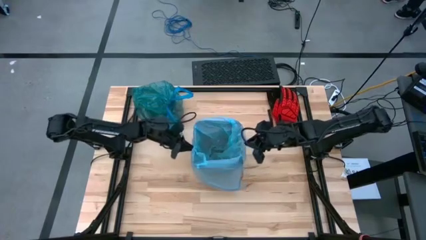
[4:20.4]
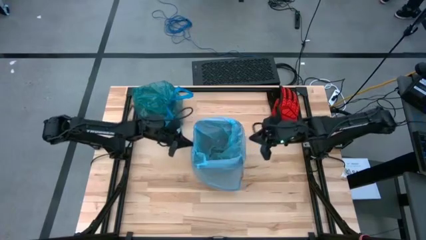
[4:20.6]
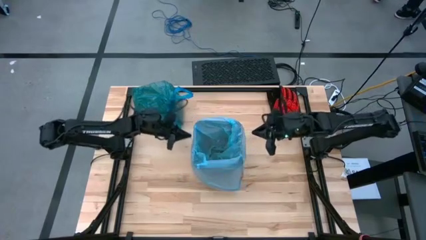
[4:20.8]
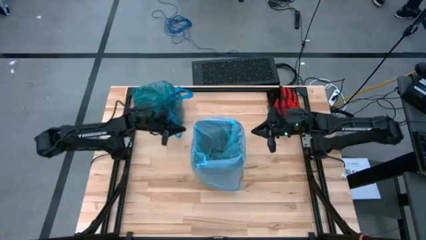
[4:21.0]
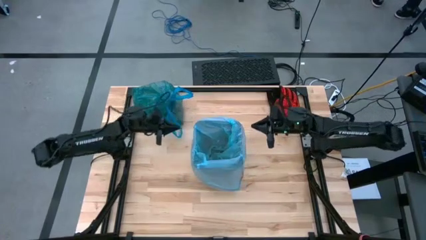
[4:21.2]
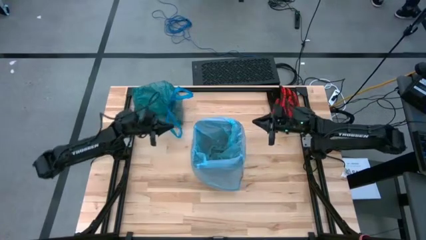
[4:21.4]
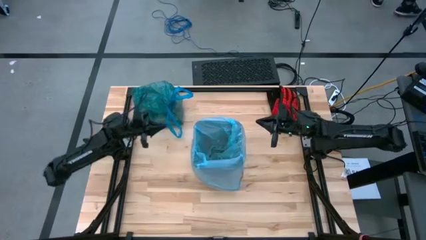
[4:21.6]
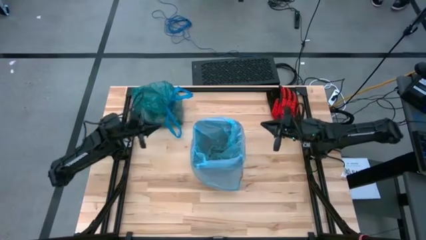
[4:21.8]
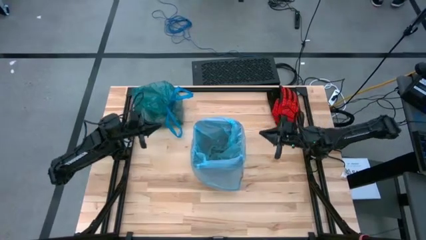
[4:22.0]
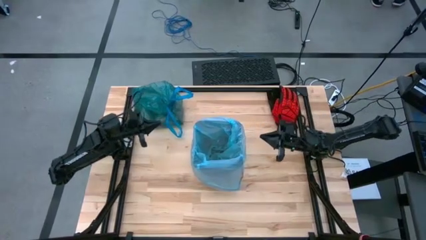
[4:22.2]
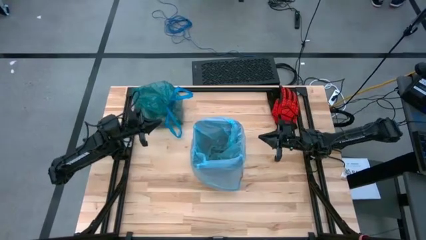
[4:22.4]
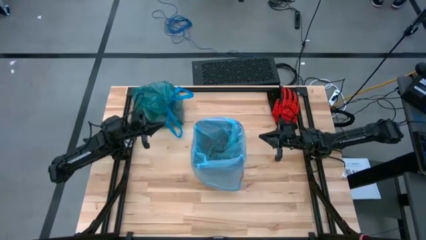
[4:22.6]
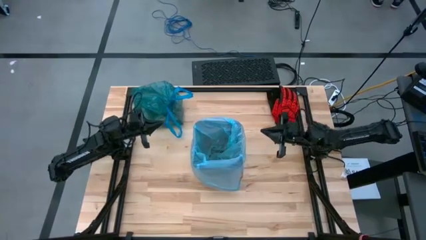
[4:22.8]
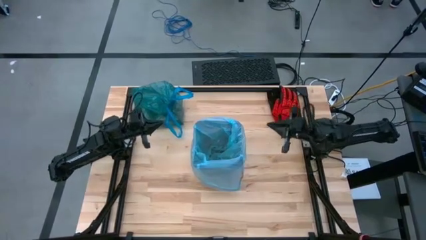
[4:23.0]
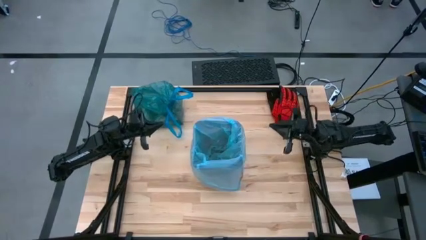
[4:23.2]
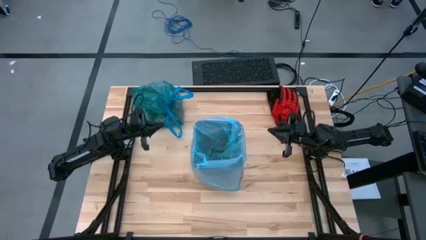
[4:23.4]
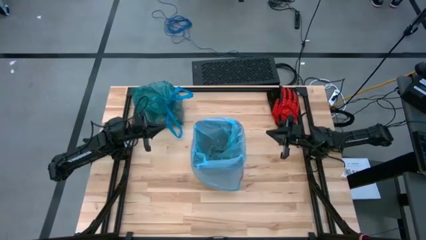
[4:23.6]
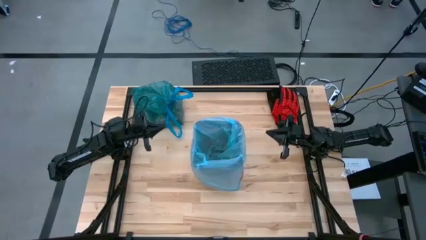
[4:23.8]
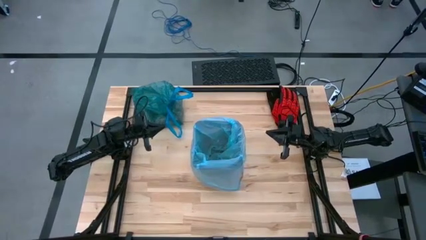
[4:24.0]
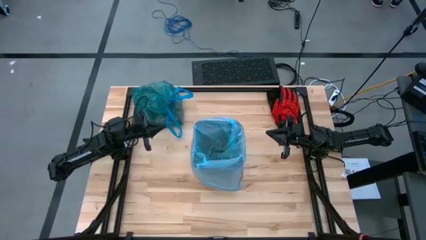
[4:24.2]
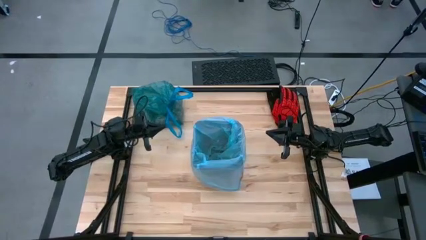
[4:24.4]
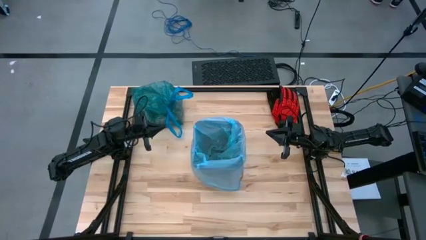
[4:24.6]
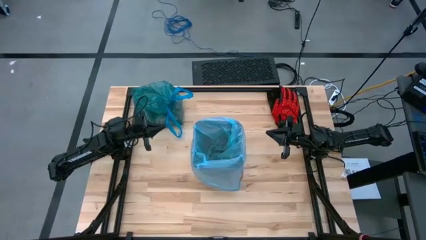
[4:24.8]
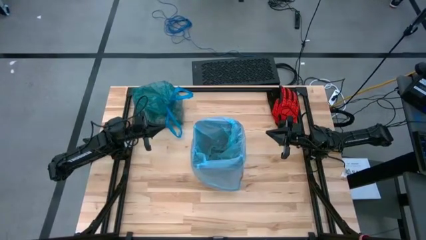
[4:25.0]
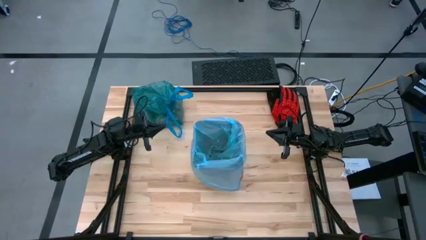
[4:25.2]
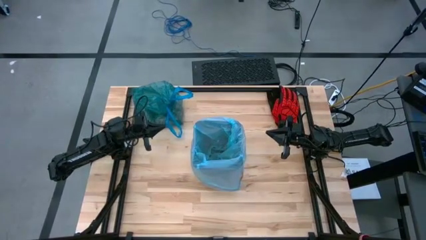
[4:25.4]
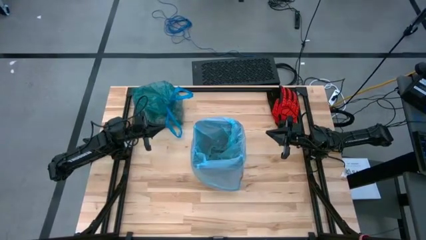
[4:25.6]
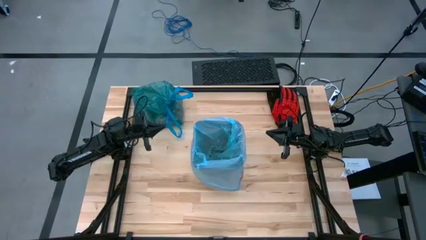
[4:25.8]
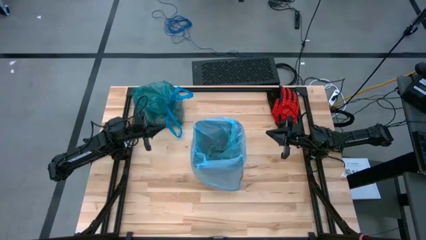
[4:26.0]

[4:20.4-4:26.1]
Task: place trash/remove bag and relplace
Return to Home Position

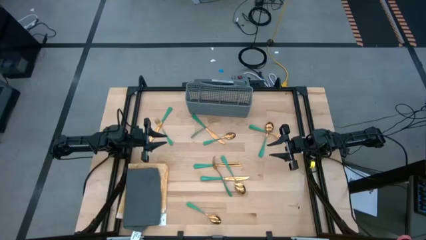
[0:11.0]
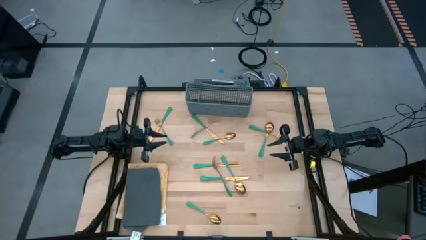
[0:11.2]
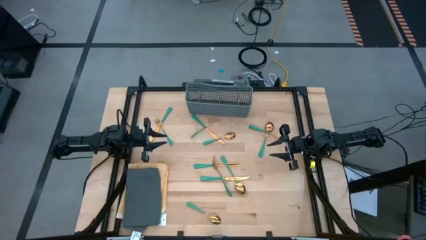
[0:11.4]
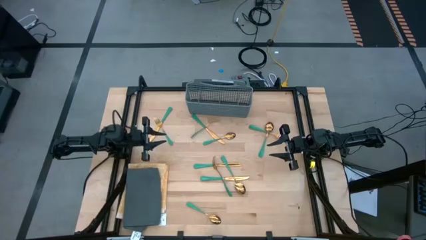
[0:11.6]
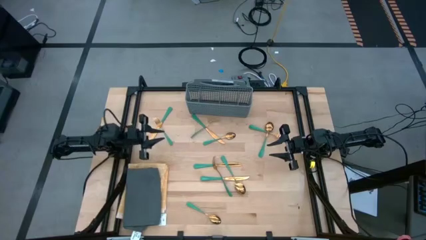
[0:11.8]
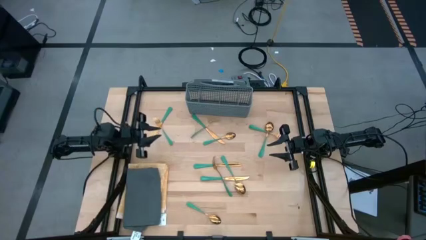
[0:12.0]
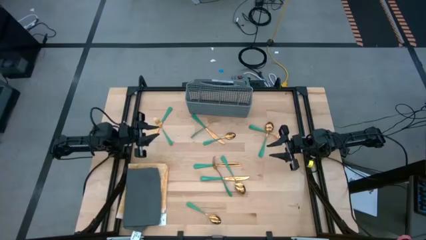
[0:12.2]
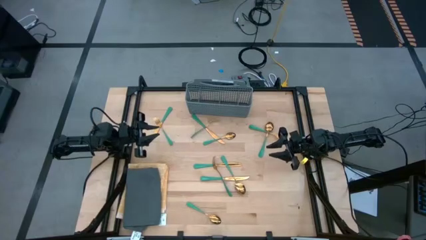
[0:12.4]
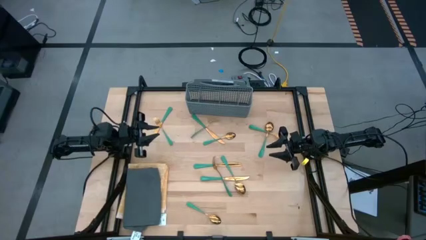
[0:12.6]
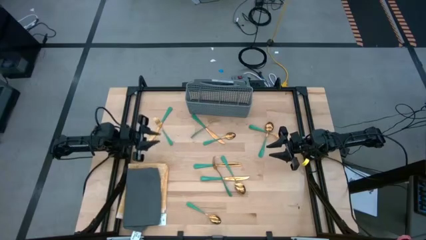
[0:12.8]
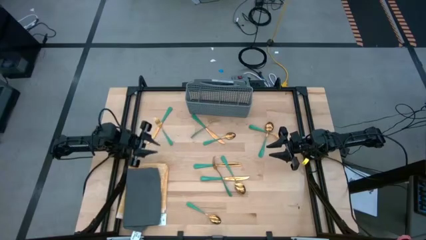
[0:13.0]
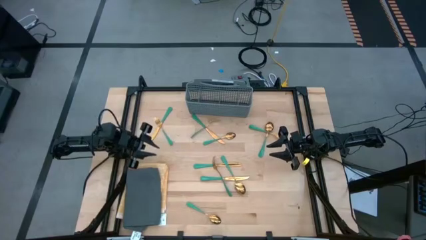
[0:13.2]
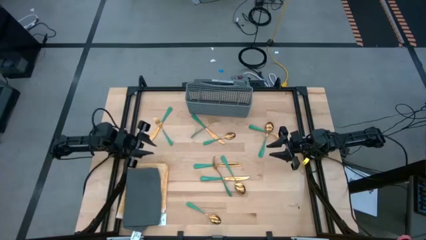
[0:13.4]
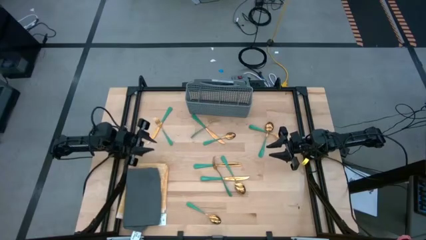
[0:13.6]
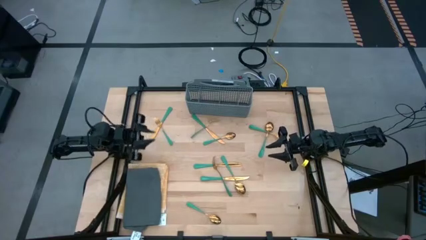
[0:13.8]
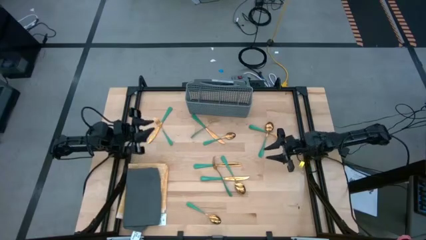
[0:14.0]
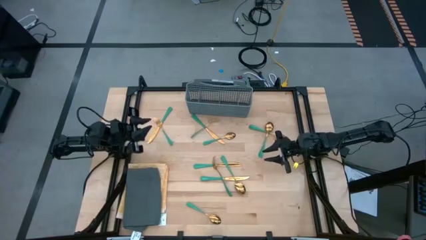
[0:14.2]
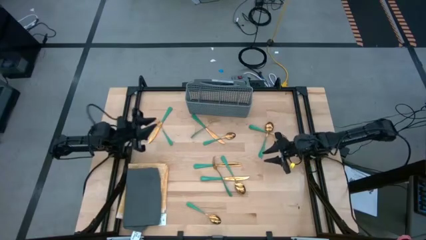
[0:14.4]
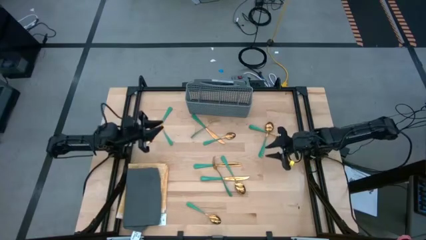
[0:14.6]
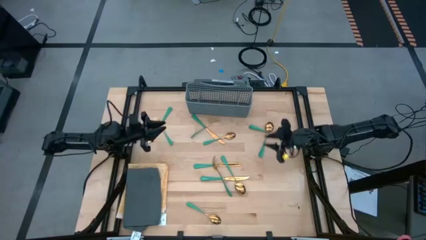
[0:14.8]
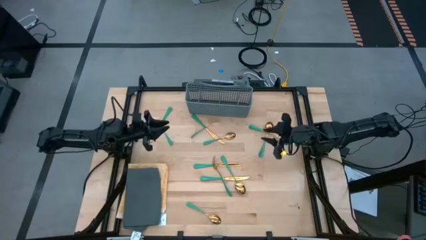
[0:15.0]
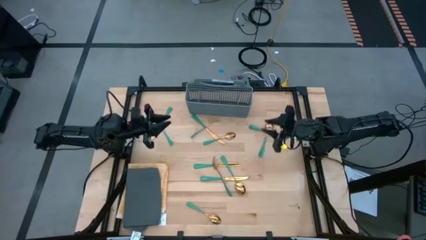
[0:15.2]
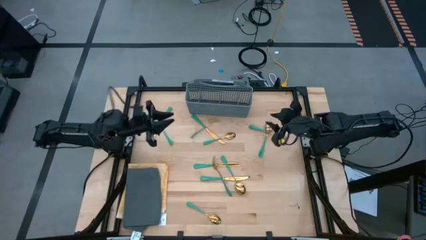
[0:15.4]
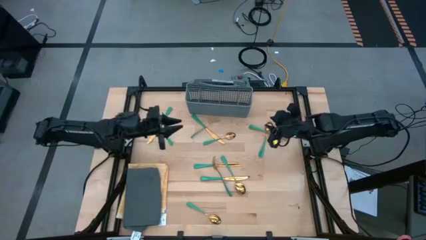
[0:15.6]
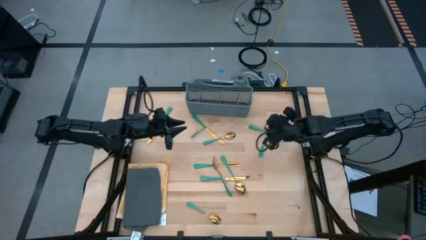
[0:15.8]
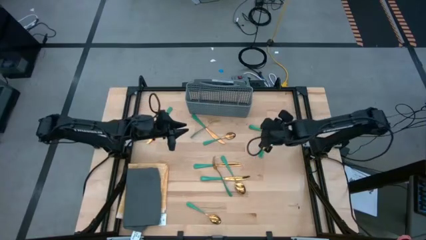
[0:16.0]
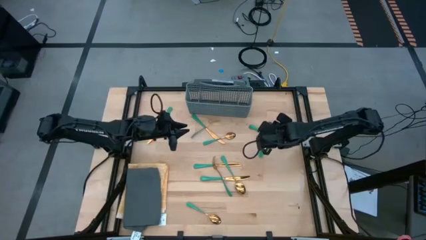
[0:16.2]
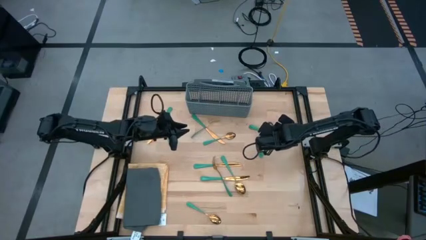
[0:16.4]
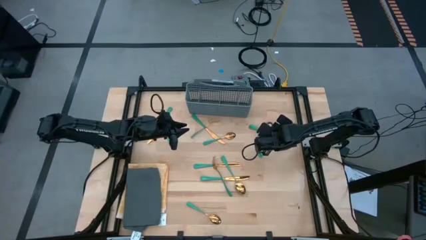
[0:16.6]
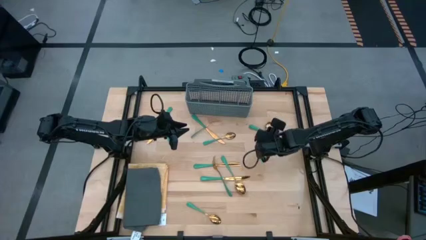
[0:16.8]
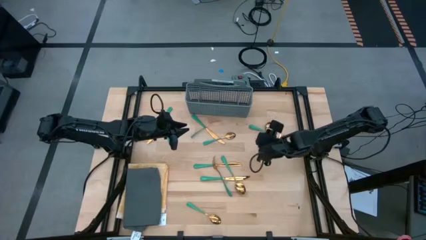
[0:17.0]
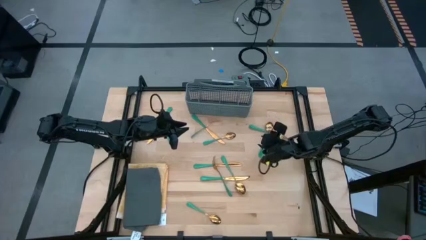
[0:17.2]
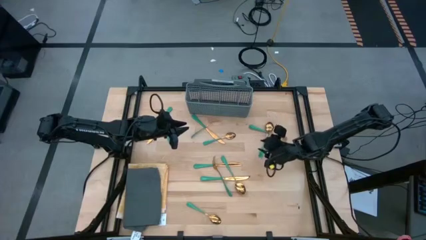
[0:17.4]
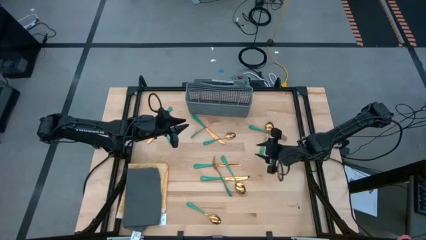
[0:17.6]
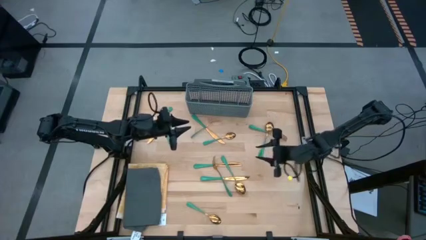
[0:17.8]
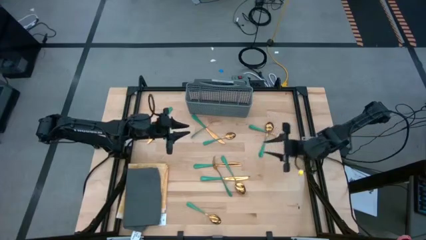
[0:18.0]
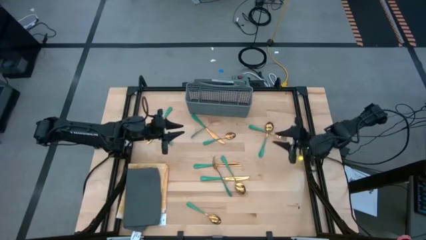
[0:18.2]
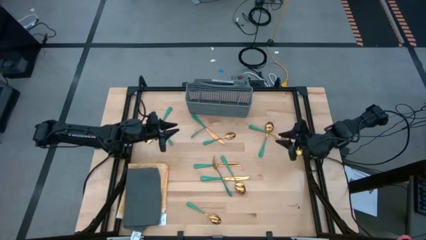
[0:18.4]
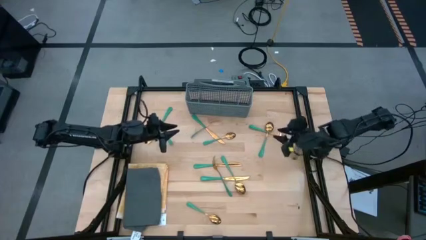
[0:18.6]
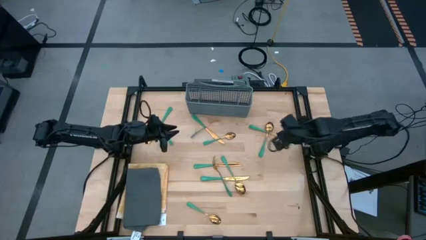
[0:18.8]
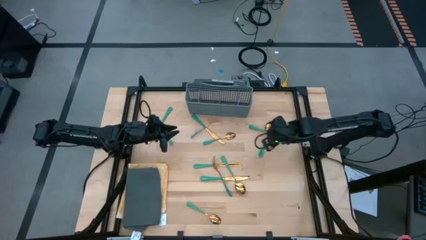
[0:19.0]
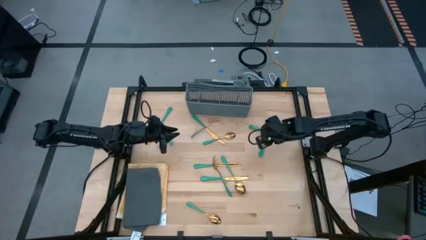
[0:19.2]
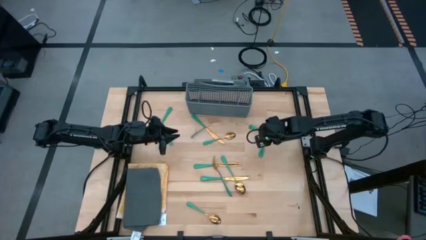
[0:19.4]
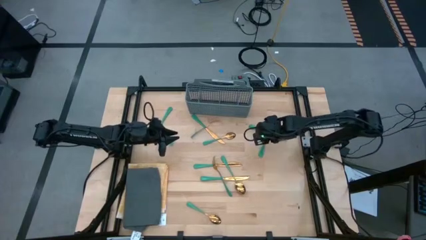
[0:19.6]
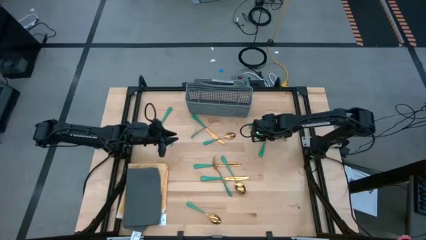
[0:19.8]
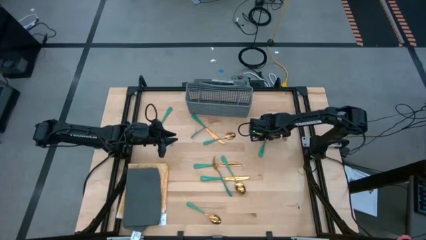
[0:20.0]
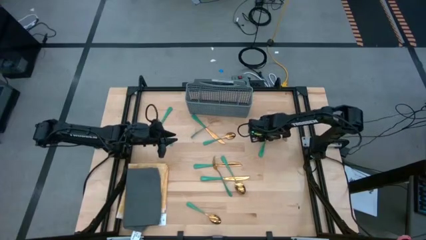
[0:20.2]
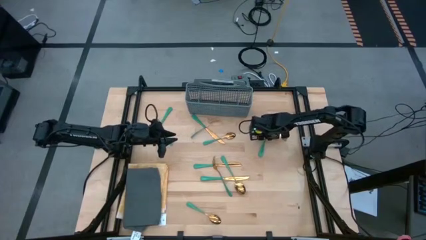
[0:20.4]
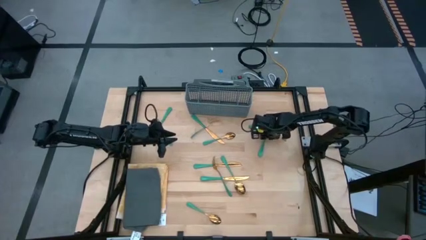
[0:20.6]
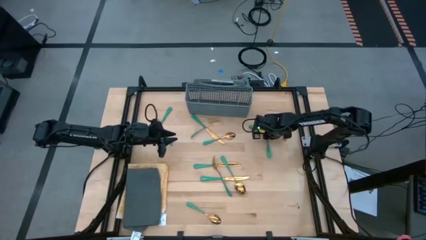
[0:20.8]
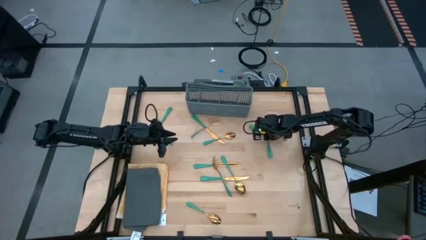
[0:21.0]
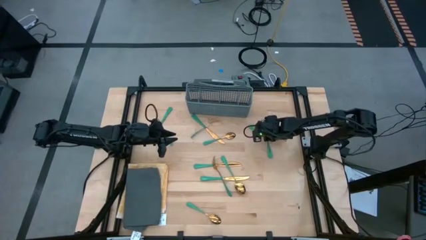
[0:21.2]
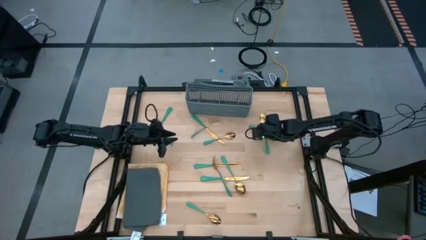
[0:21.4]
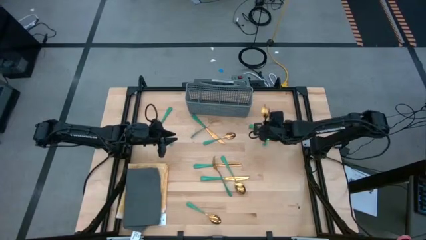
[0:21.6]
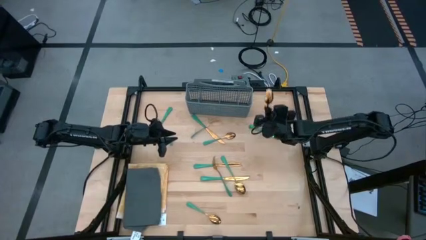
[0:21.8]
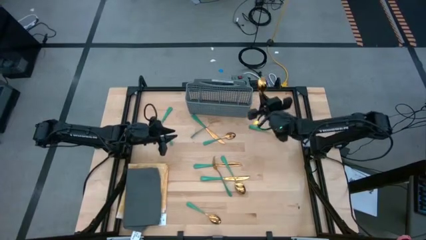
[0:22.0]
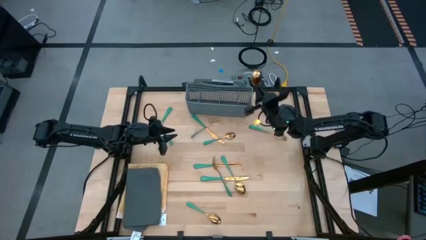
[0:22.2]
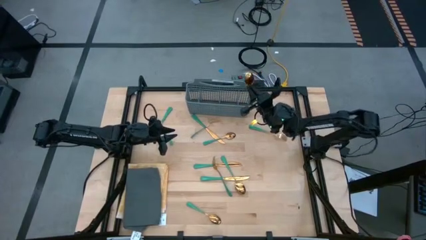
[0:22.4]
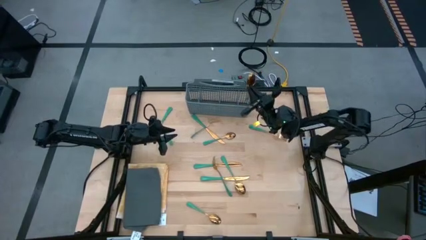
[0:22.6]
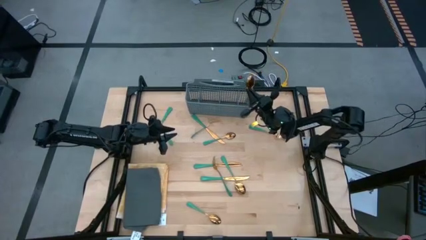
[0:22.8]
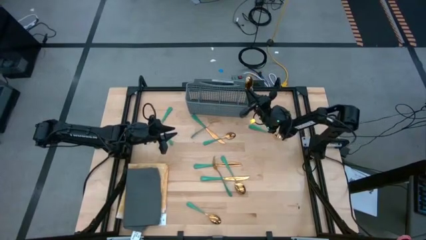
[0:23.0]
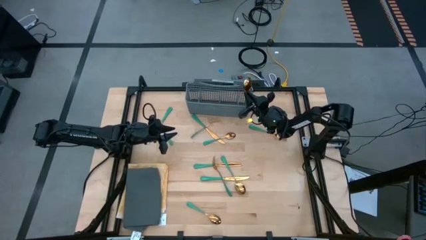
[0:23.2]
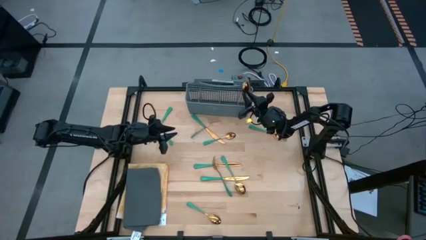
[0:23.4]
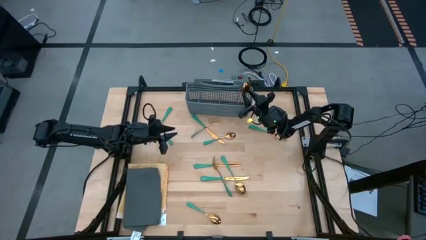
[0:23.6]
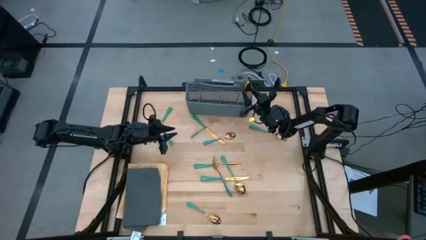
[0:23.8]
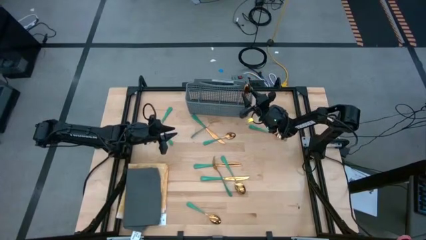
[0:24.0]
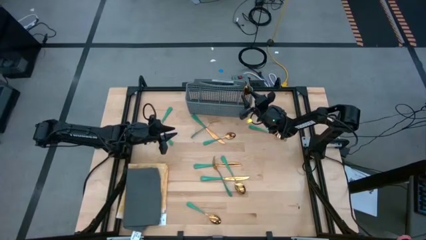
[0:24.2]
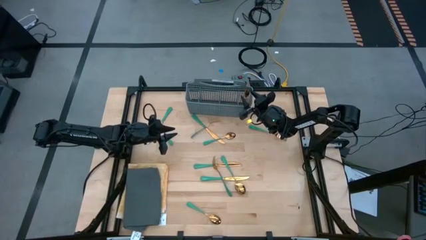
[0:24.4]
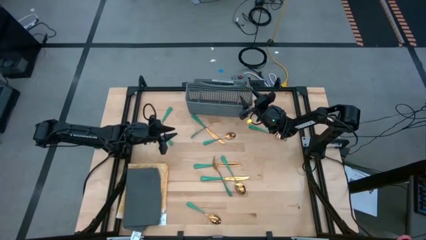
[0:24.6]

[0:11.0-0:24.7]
Task: Sort silverware
Put the green spoon into the dishwasher utensil holder
